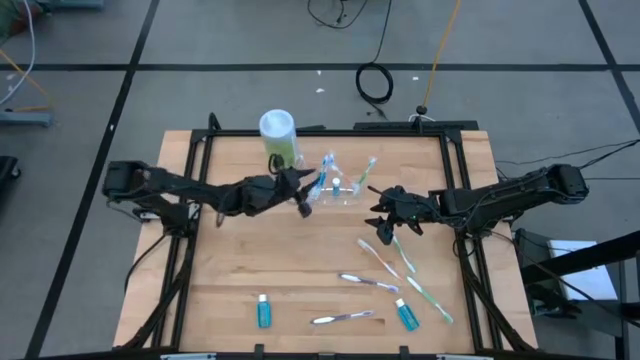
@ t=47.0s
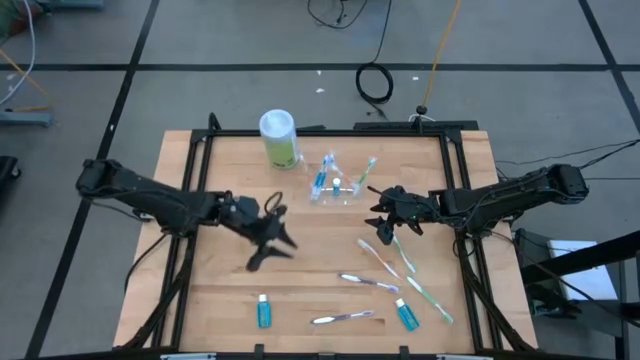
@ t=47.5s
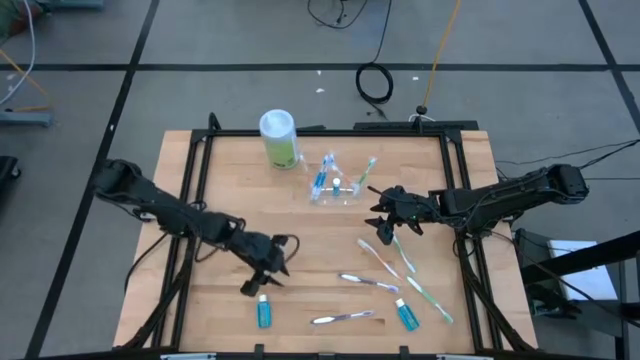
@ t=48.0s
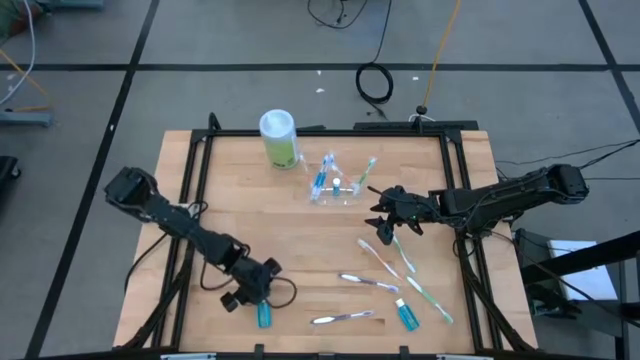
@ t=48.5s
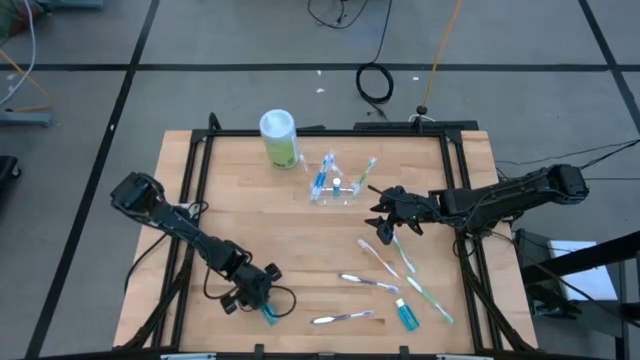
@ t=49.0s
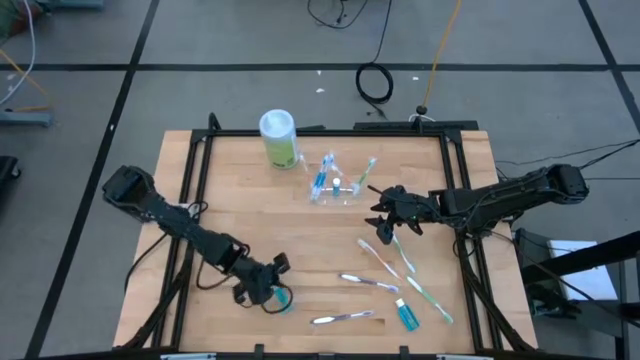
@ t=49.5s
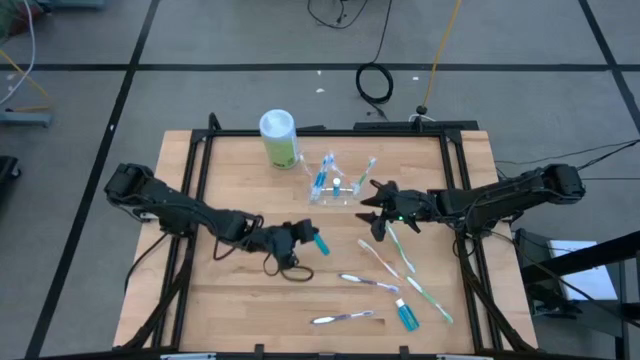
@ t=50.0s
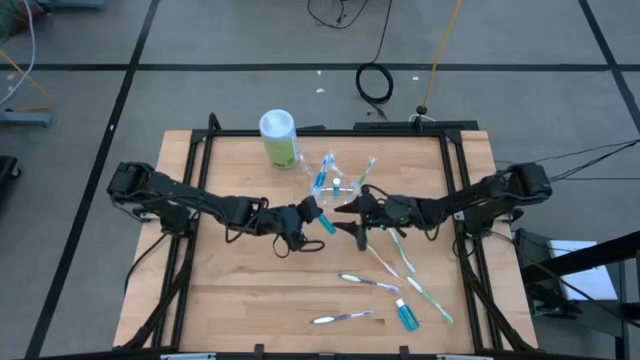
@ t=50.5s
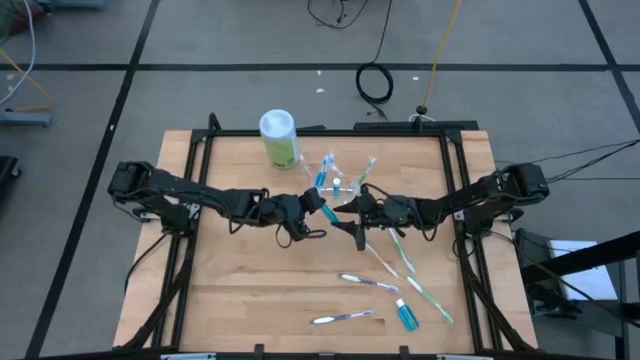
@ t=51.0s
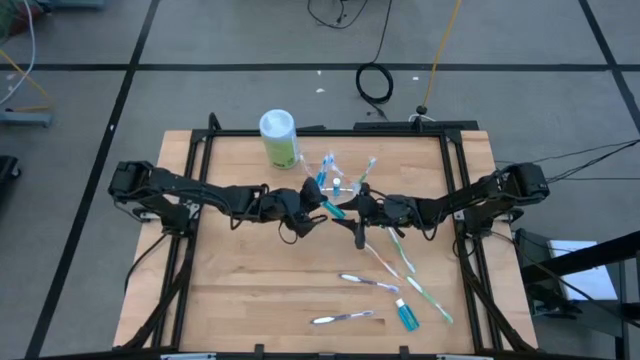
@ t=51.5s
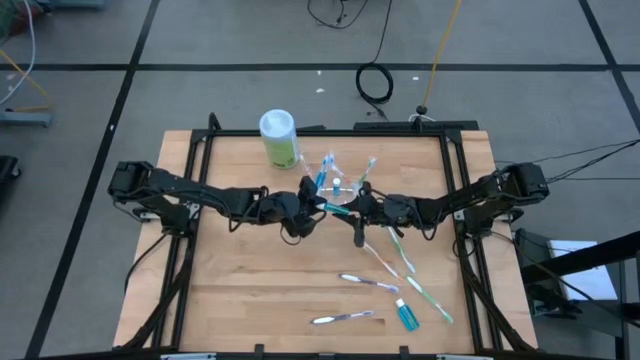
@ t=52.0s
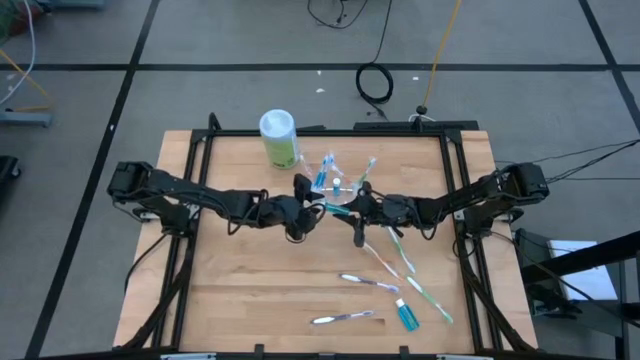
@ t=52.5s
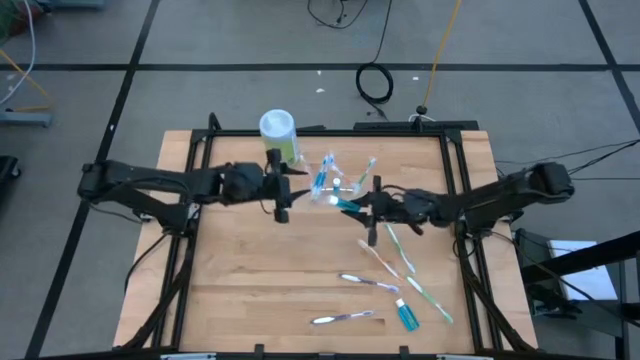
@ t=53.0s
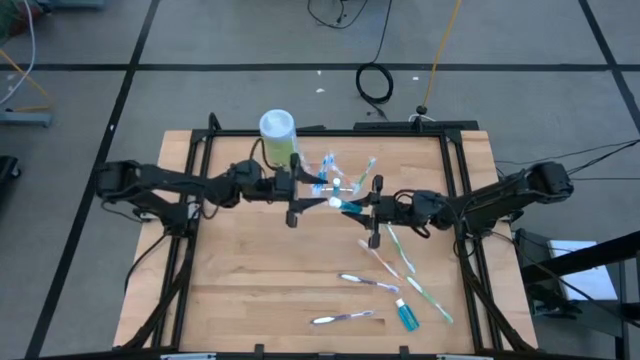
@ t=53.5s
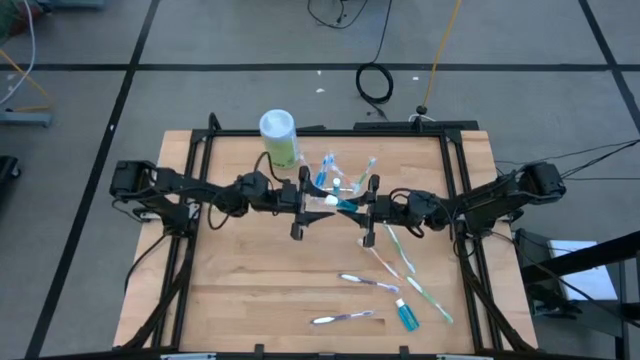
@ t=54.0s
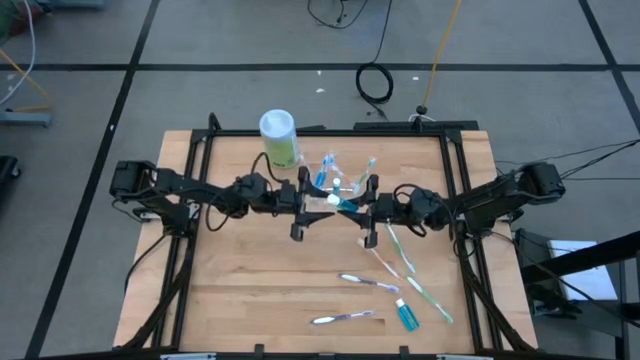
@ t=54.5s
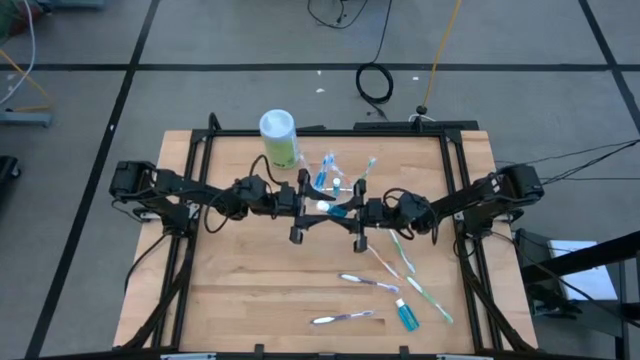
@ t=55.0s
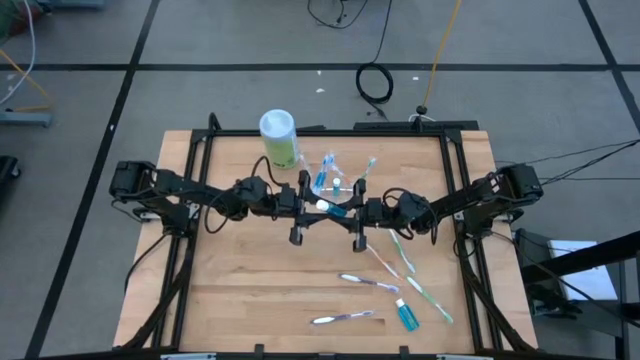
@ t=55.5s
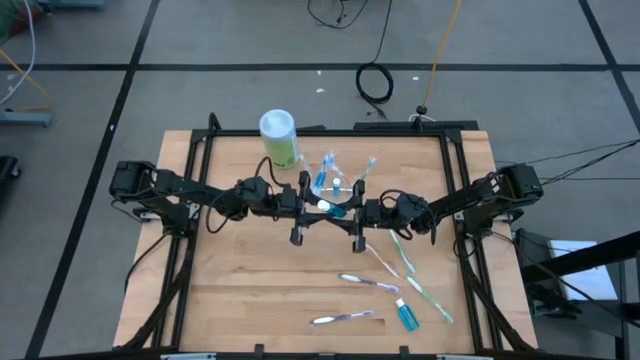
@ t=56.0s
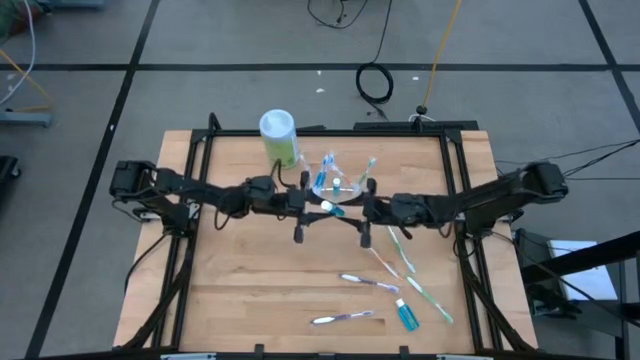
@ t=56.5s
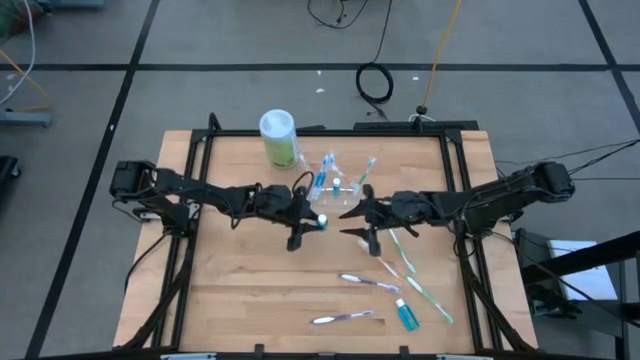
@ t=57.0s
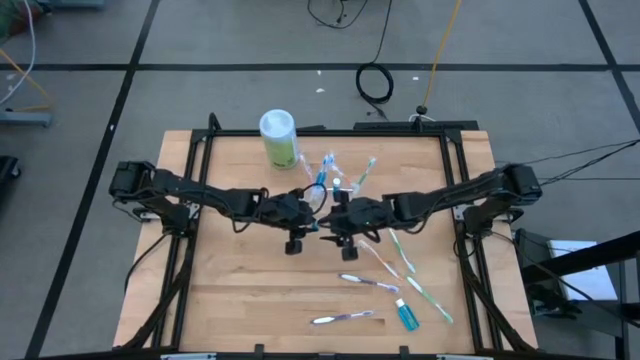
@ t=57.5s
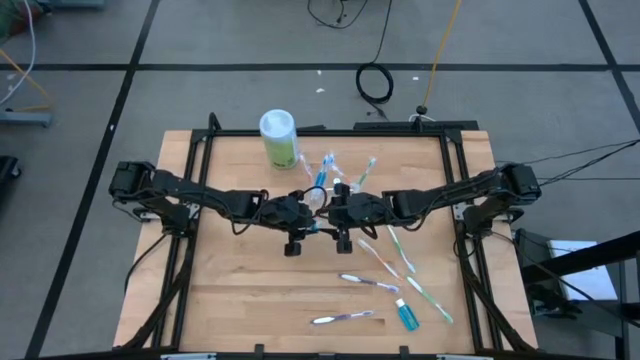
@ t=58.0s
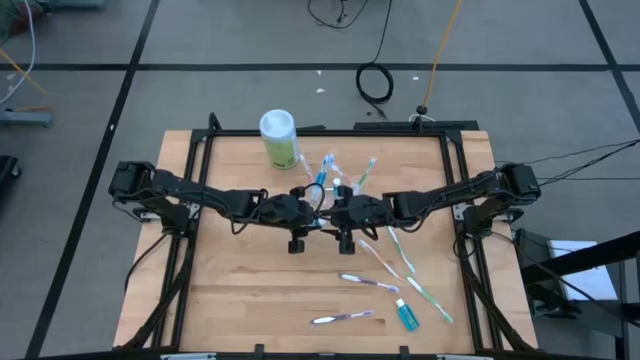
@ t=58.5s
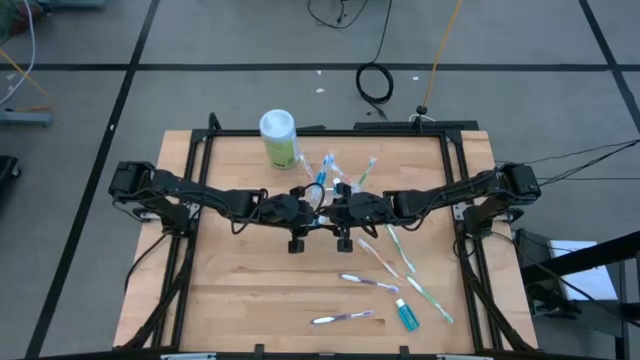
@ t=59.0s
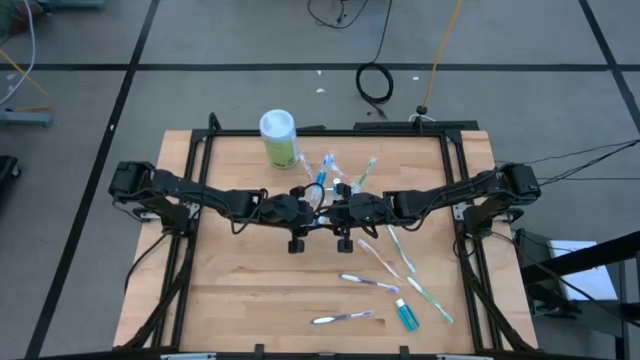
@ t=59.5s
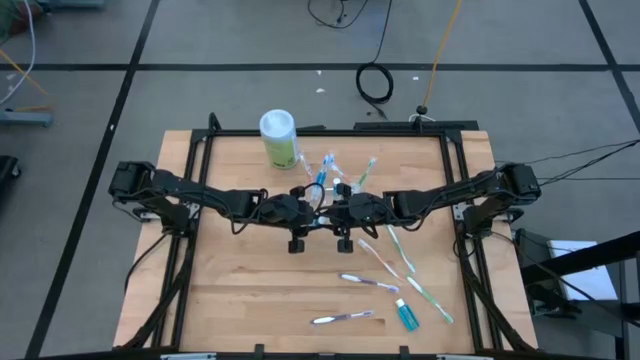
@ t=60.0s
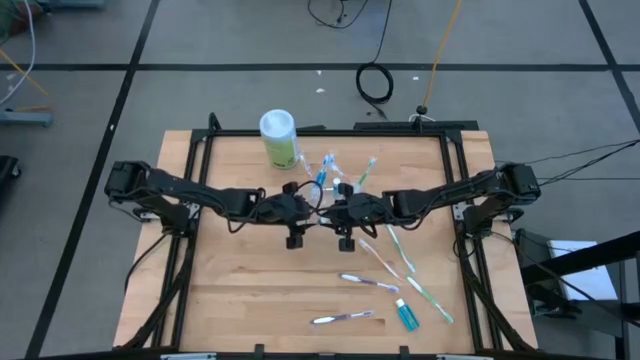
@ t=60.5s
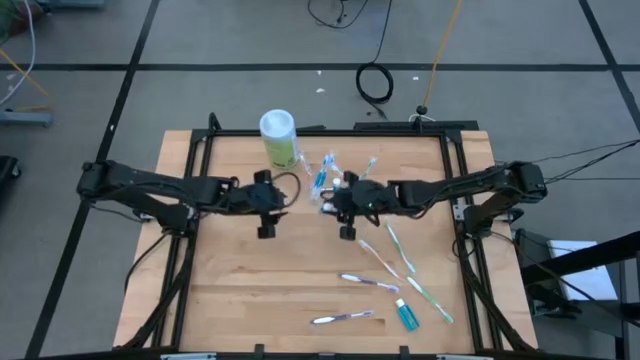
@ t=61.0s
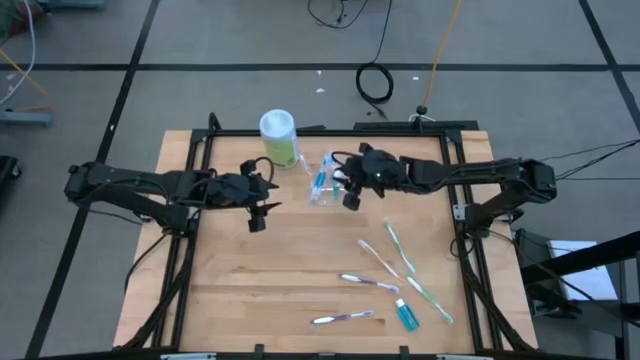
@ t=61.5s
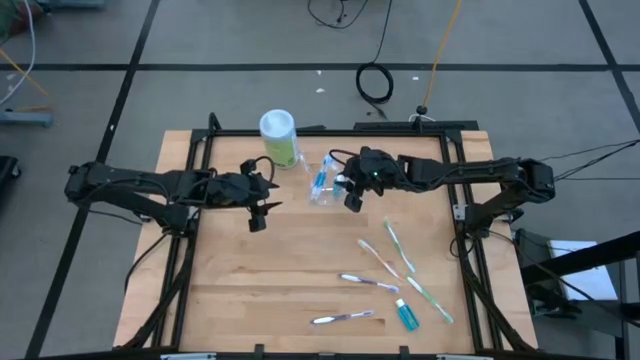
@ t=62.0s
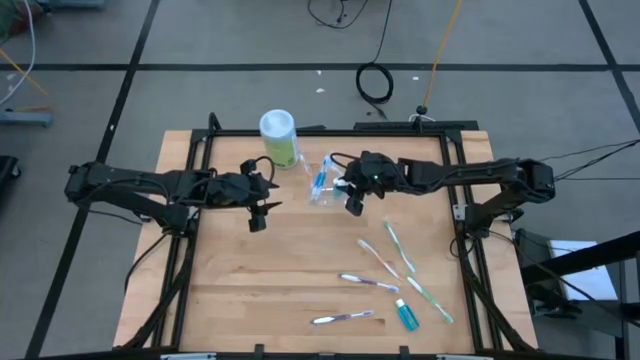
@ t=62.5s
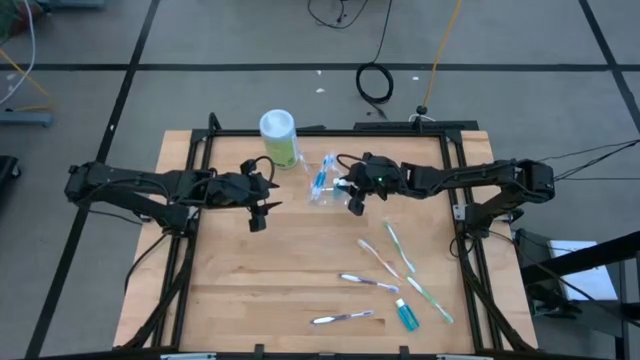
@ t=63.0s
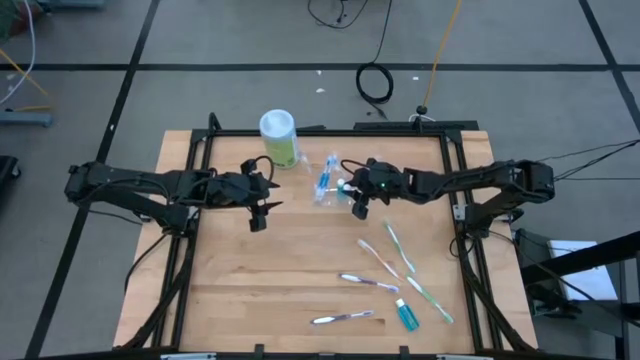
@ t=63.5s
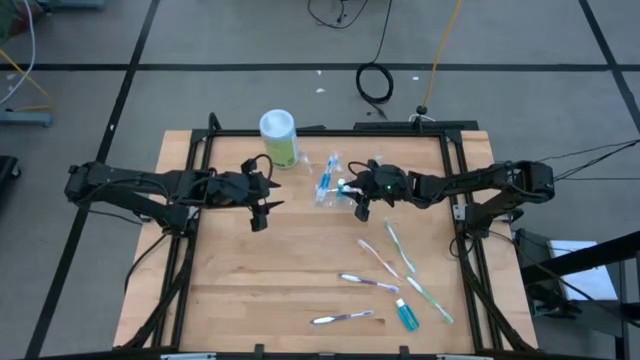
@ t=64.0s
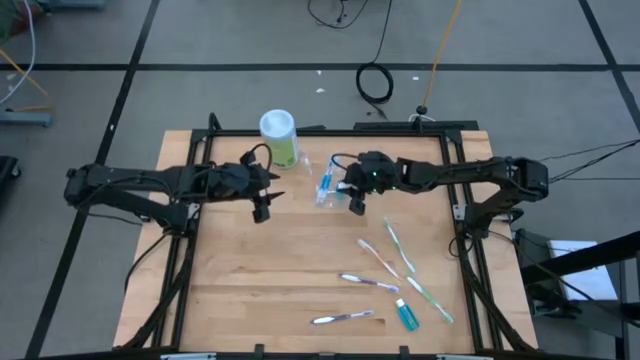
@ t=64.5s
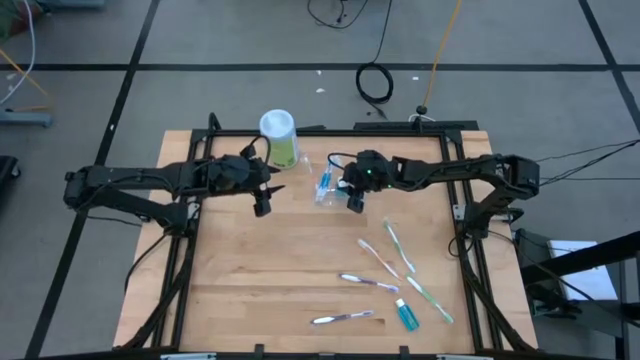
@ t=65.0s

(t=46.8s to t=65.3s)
Task: Pick & Place toothbrushing station
Put the left blue mouthwash into the transparent organizer

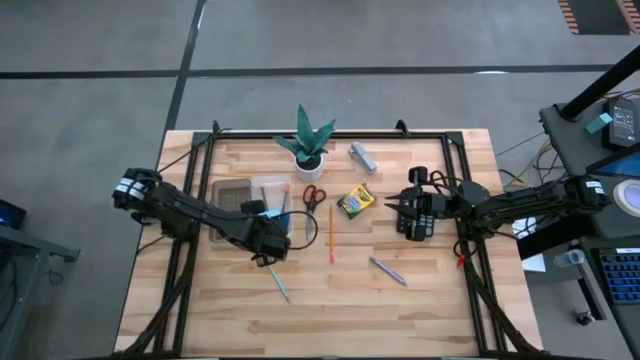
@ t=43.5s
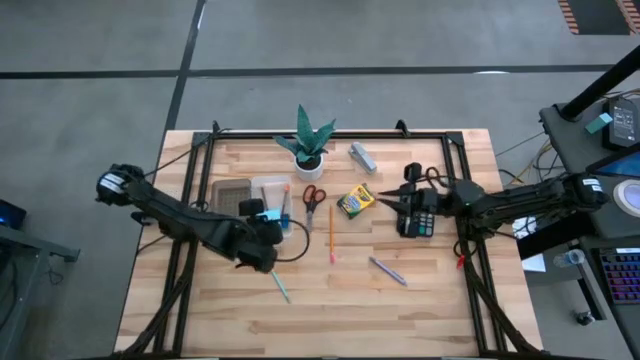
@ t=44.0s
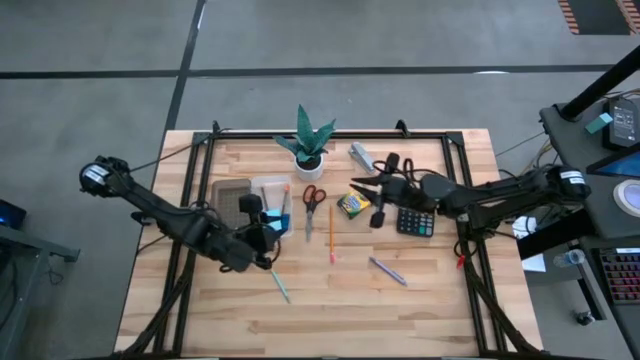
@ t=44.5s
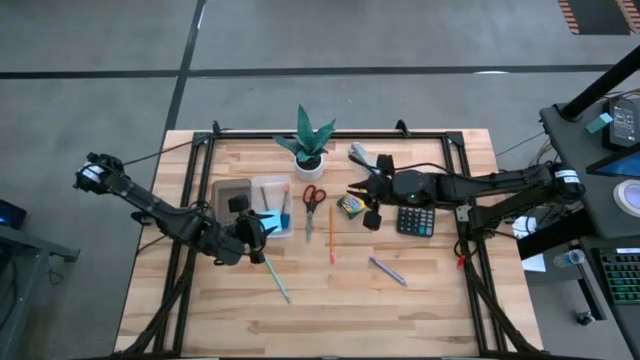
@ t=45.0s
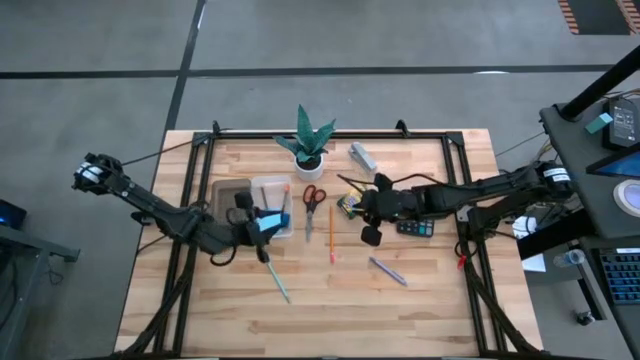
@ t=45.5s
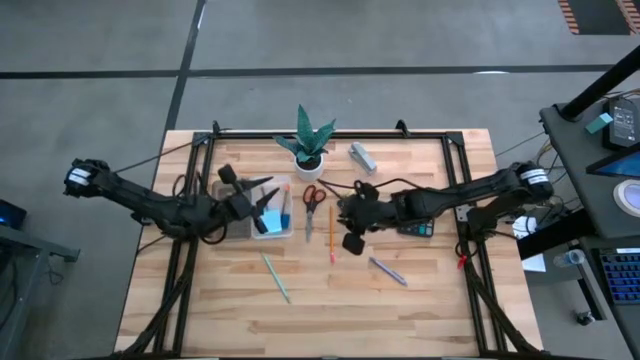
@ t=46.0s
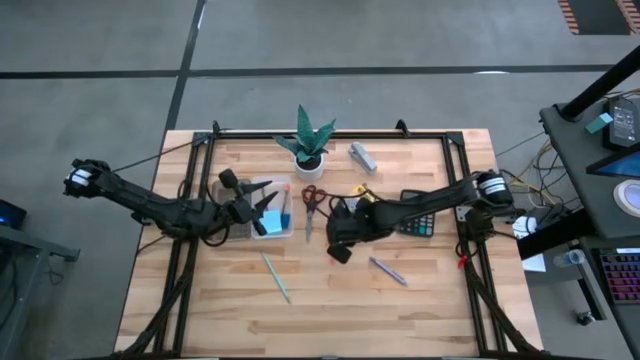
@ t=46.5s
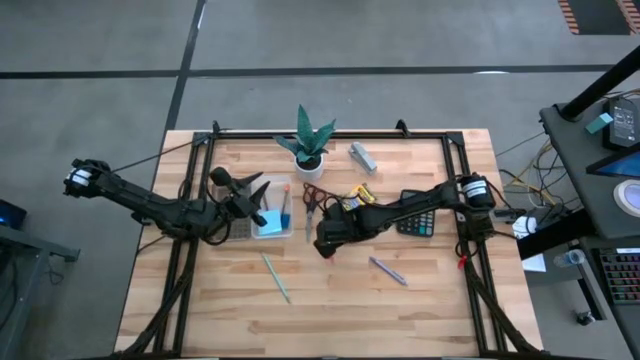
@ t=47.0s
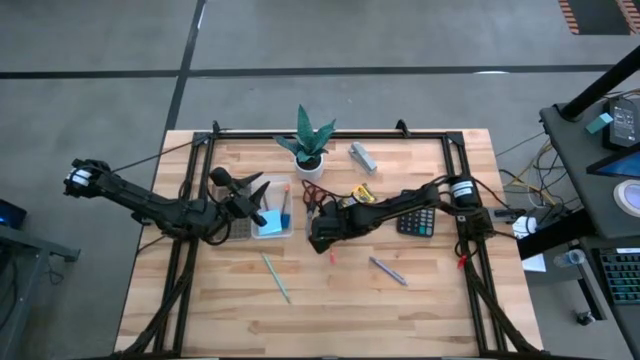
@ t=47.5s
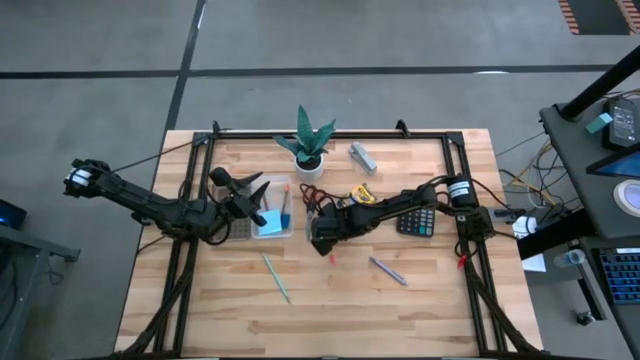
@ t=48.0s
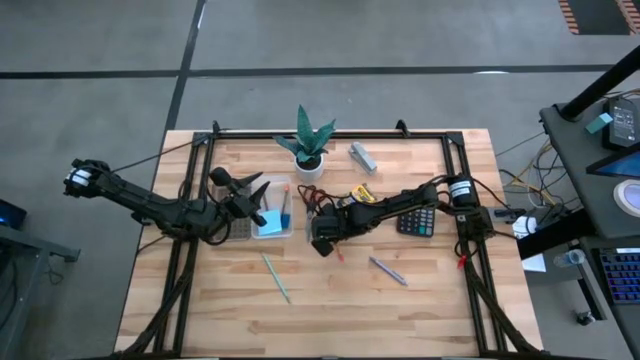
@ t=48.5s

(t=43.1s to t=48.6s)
Task: Pack school essentials
Put the orange pencil into the white and black box
